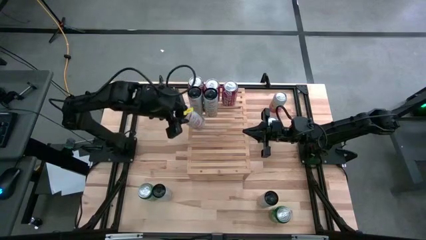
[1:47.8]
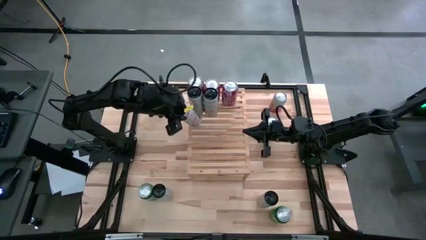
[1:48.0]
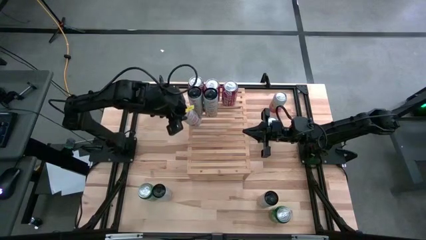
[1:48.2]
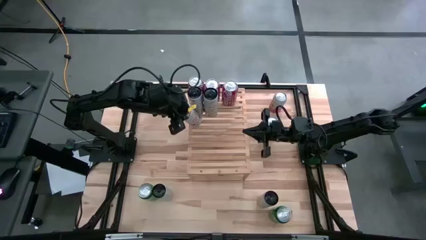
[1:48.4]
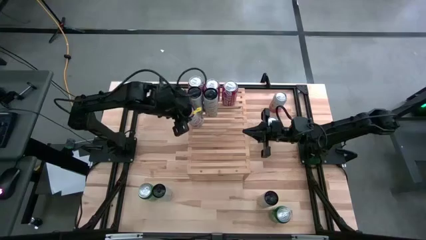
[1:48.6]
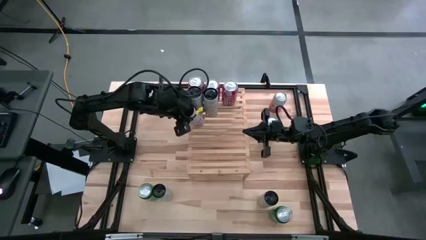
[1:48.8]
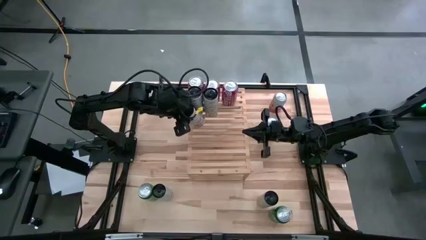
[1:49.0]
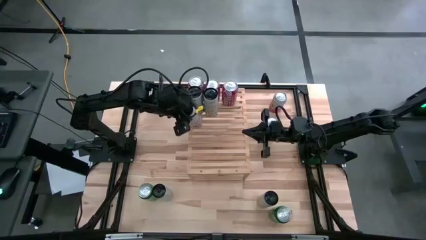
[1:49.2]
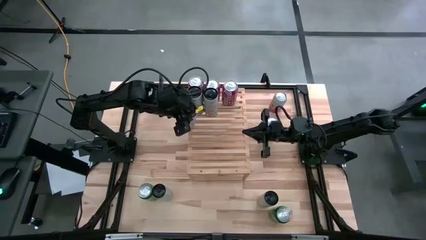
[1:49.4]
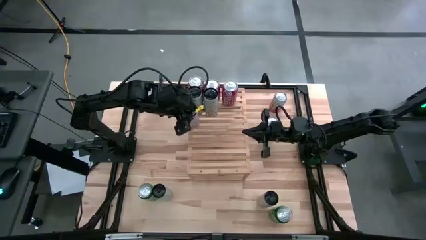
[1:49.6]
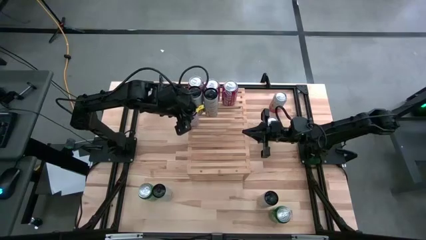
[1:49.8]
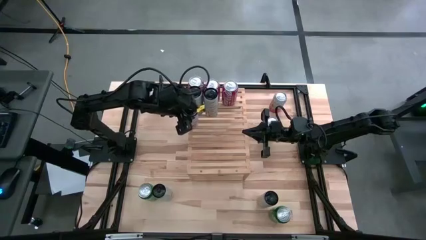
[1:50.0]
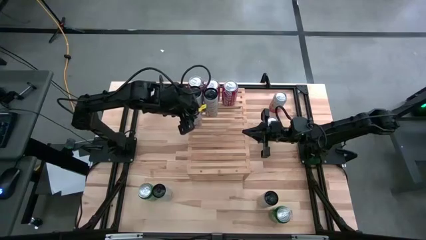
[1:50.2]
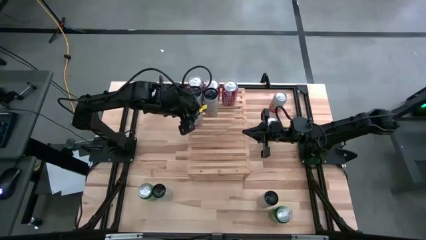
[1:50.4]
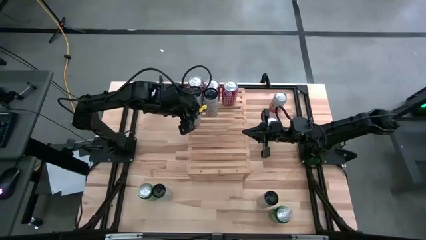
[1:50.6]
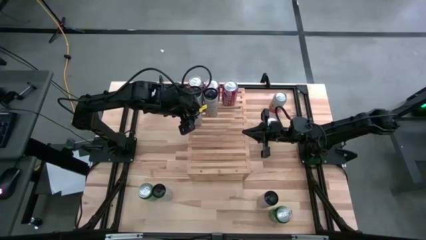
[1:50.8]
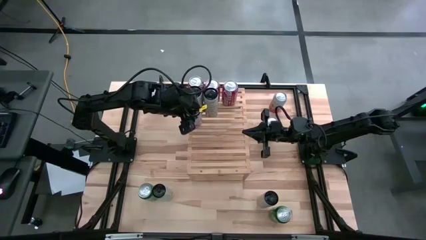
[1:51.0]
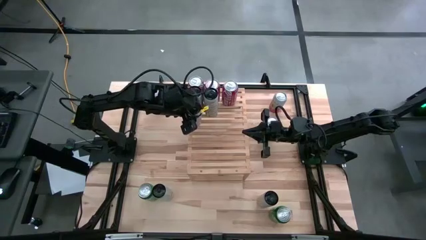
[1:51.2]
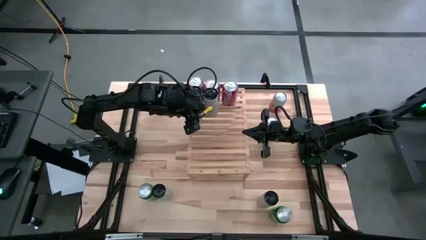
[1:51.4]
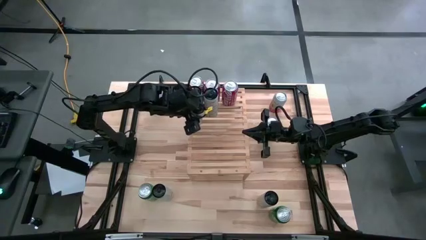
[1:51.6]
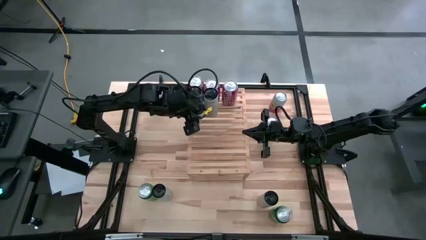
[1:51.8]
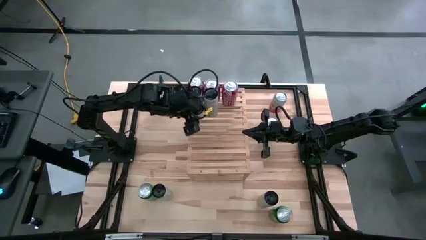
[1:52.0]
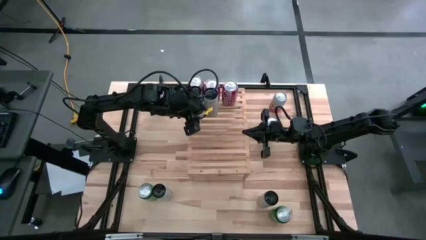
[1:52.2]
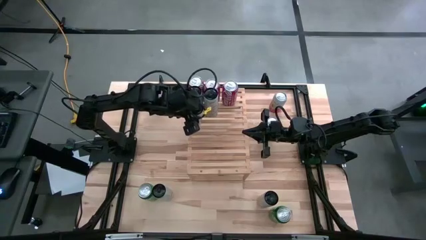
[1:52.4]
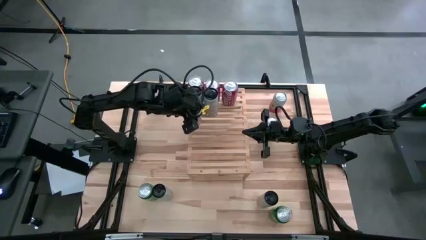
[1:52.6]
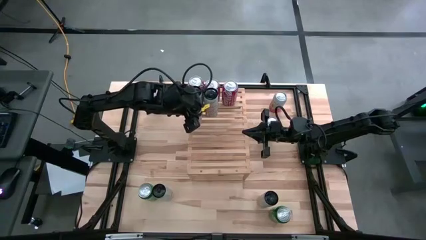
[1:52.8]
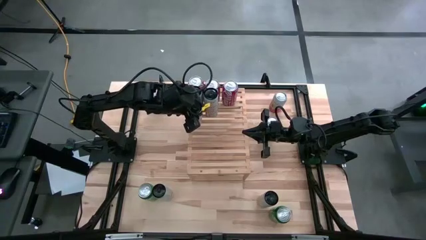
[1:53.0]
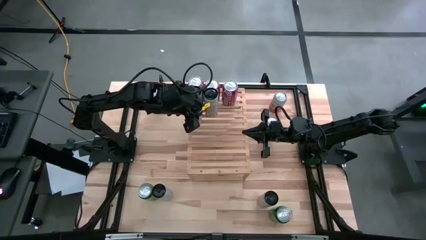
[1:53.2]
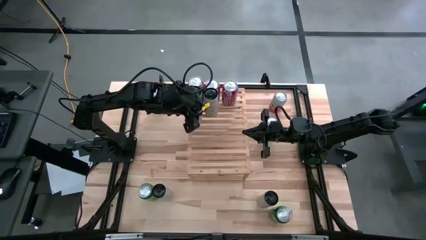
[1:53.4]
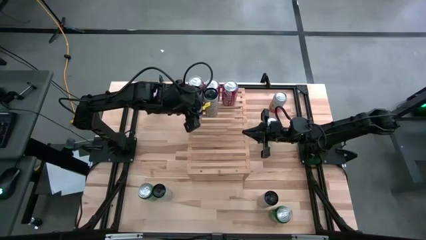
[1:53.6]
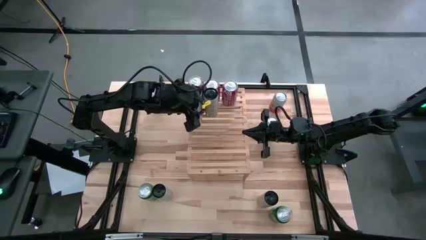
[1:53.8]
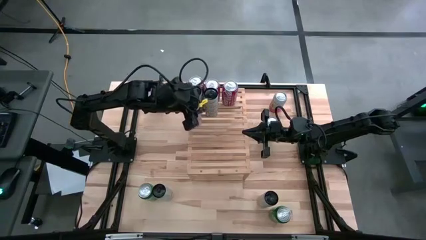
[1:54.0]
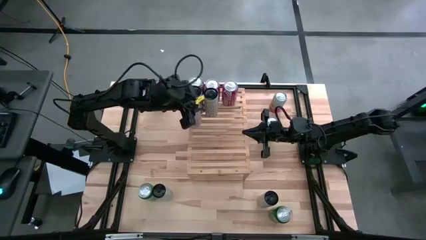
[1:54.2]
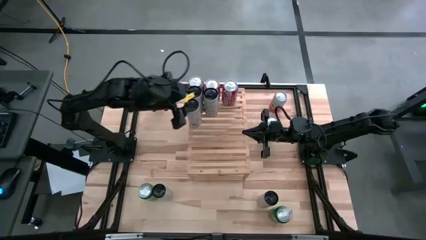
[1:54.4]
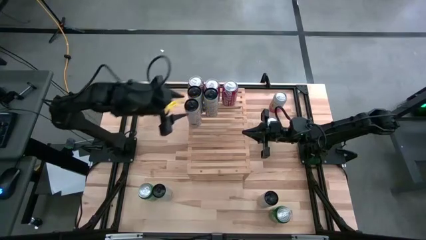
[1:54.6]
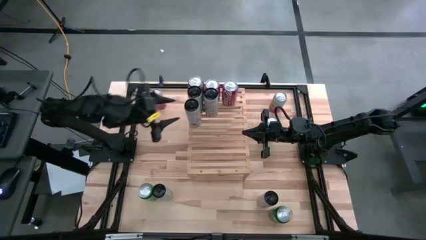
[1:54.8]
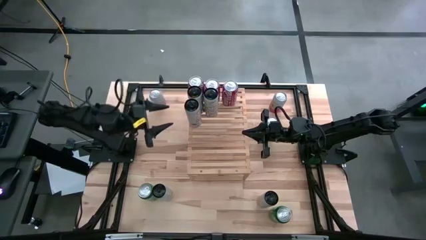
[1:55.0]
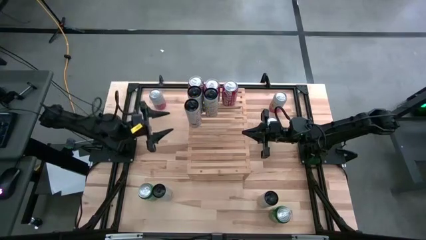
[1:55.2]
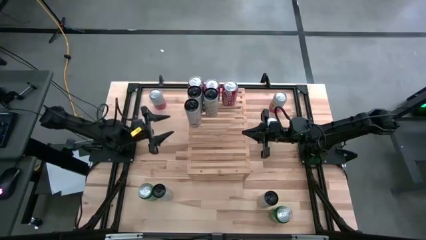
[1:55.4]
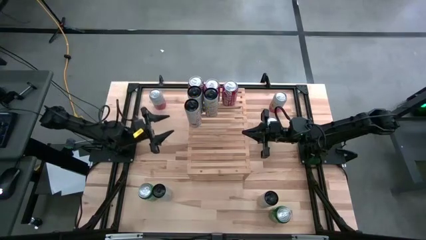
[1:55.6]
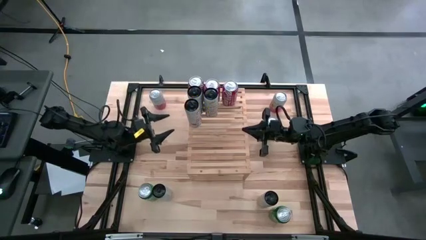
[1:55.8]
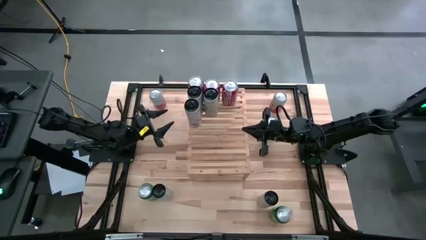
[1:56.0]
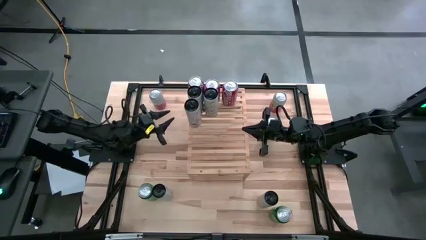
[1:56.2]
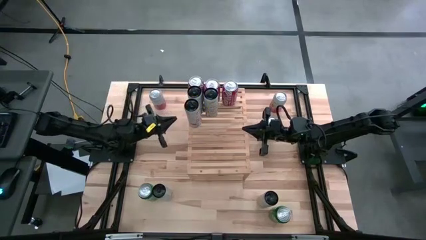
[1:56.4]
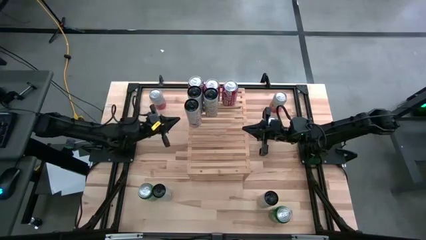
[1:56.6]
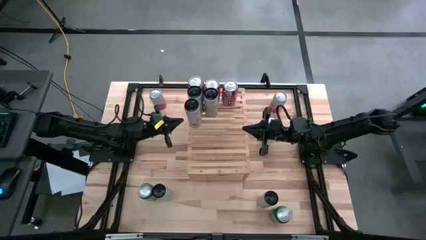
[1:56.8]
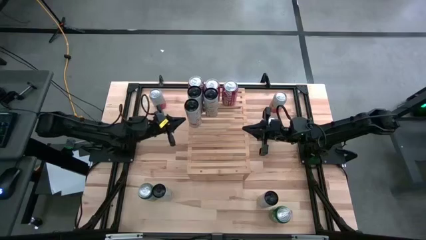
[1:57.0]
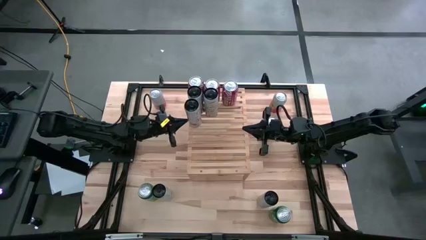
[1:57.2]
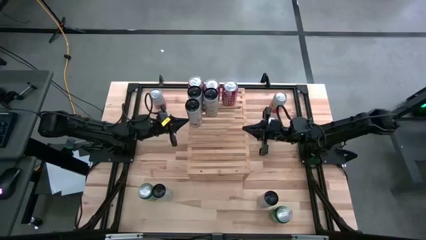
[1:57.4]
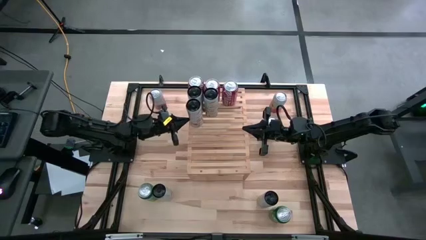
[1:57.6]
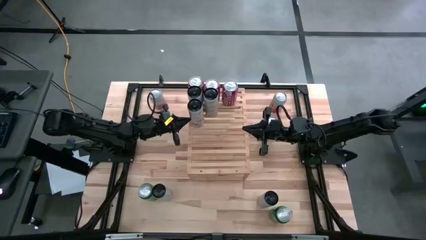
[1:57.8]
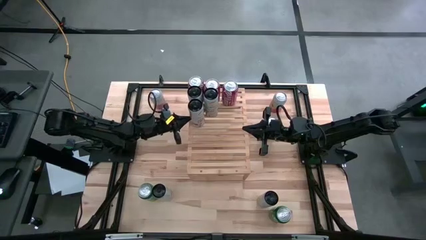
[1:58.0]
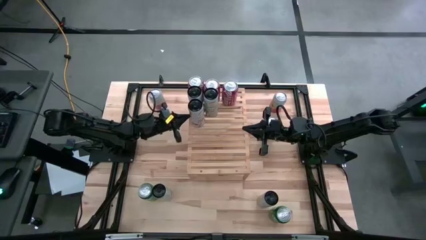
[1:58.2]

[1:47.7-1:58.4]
Task: Place canned beverage on shelf
Align the bottom left peach vibe celsius soda can with the other tropical celsius soda can on the shelf

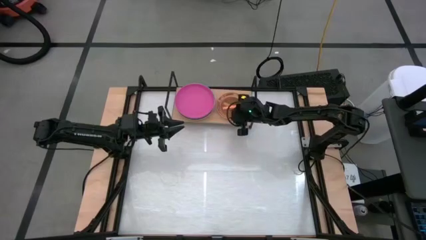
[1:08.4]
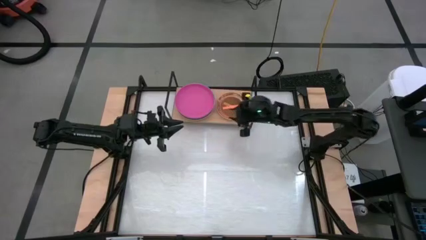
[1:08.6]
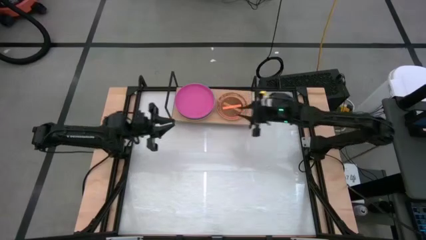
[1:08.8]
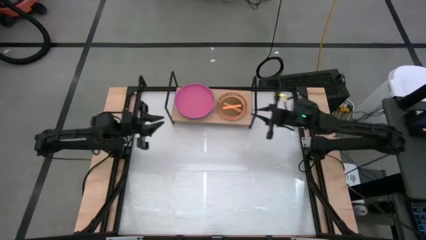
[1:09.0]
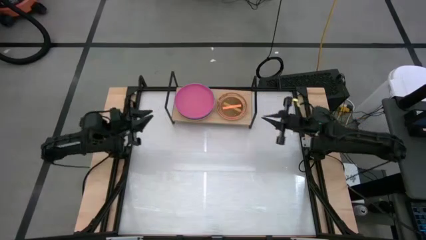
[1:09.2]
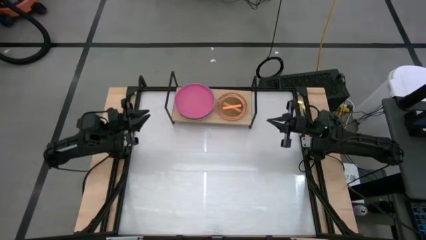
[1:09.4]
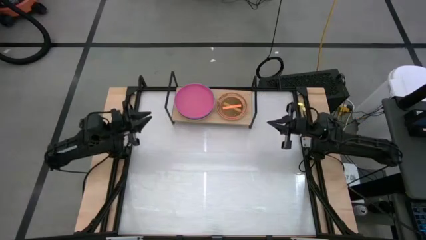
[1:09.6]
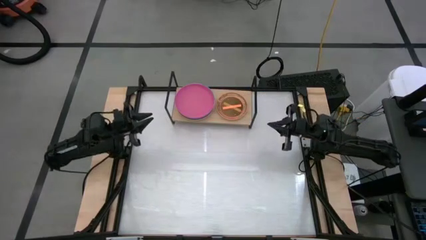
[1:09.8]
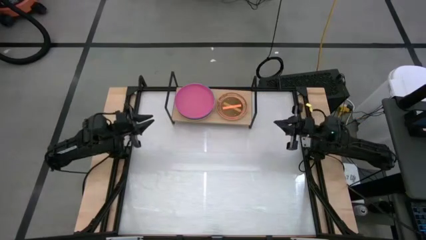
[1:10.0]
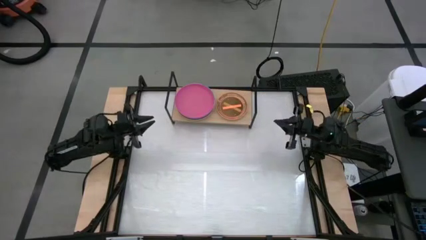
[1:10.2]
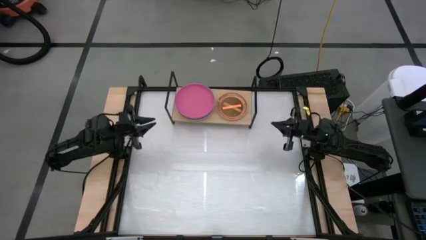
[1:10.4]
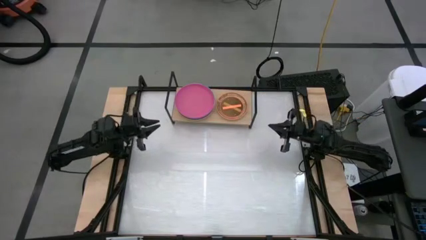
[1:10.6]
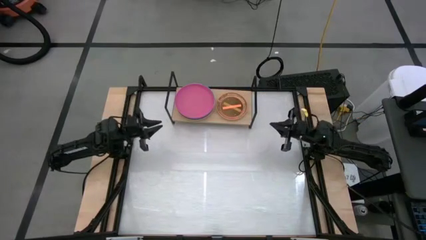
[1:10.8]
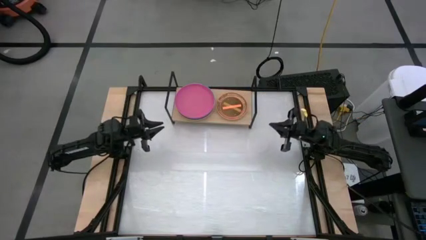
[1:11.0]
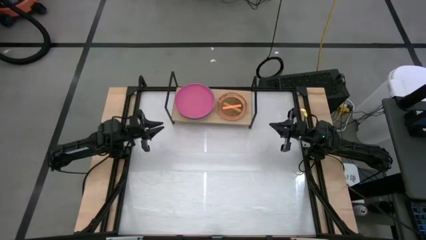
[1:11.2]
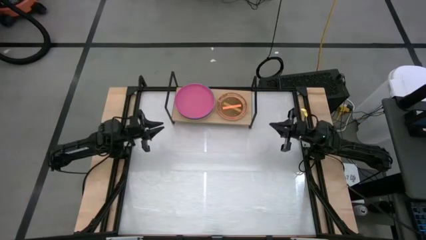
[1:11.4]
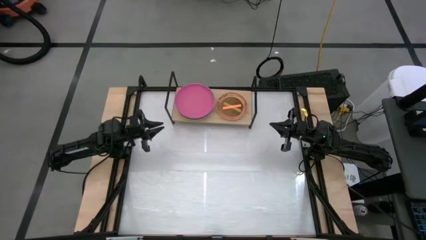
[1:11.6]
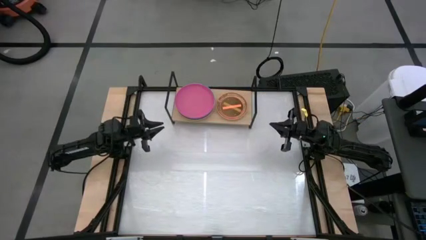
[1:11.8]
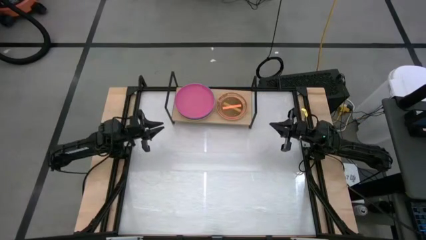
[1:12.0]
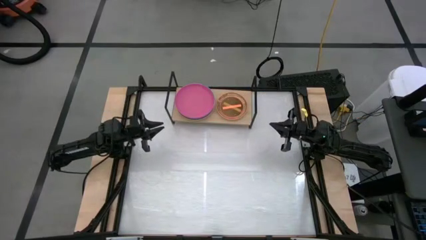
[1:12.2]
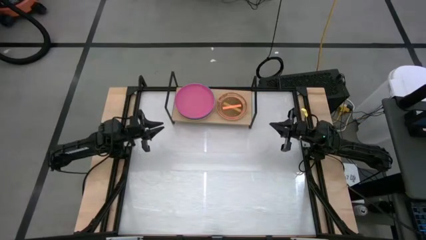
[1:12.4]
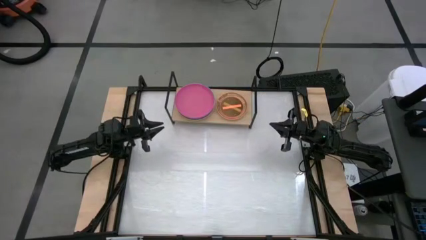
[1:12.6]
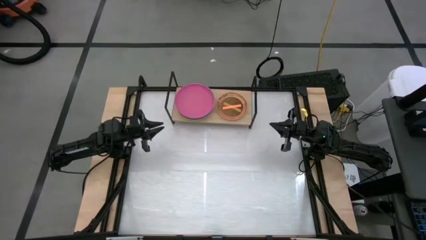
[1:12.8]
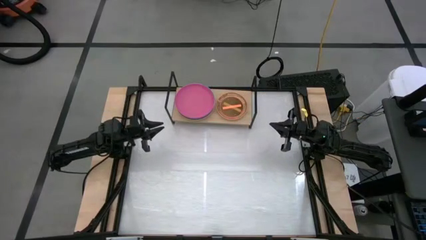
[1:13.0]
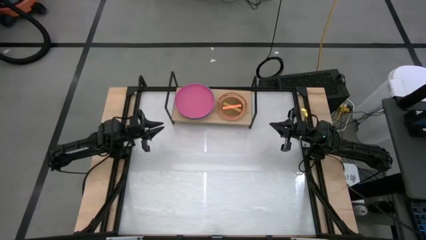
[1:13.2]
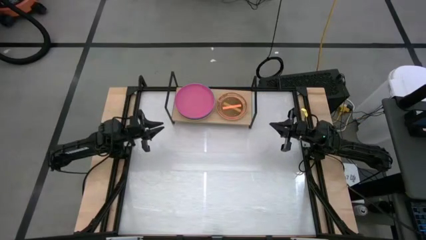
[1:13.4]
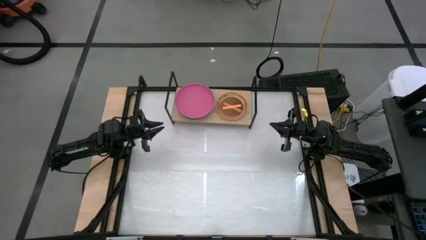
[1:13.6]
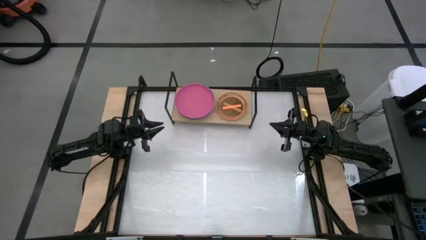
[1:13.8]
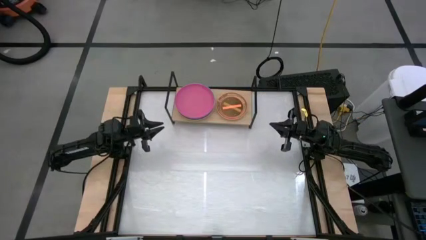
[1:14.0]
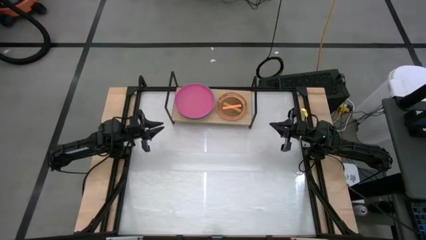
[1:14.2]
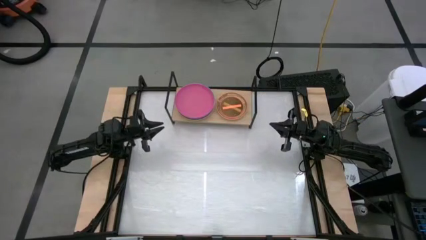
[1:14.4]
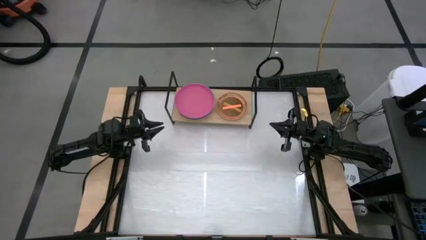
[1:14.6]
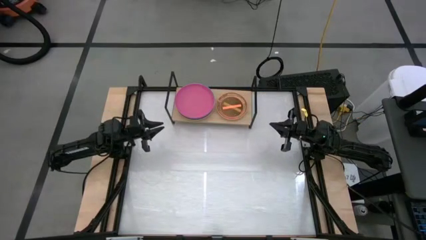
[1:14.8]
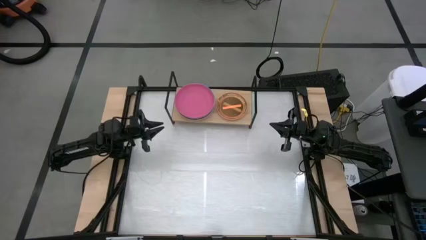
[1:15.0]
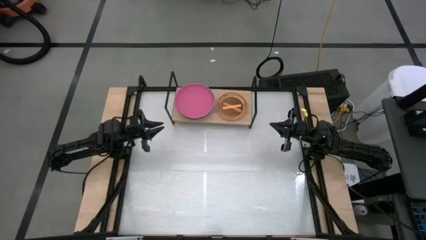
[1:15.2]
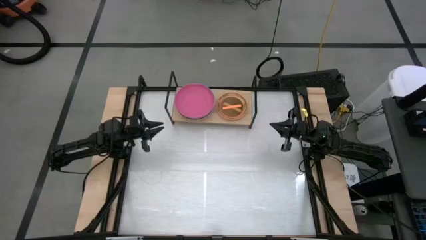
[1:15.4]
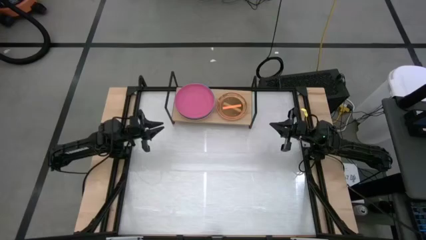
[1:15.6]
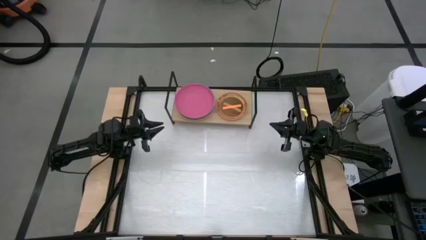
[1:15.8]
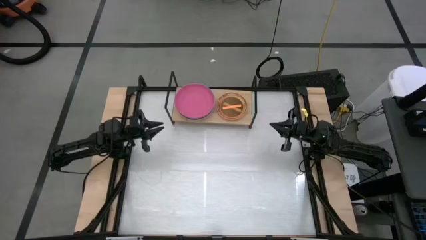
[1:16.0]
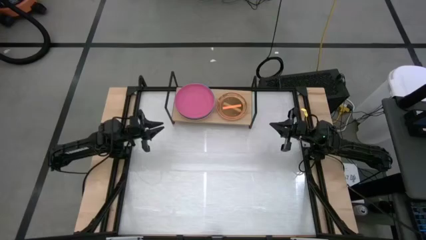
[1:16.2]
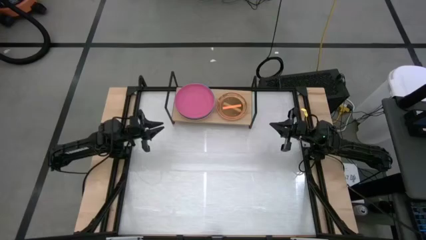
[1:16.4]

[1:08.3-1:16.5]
Task: Place and stack plates onto a shelf
Return to Home Position
